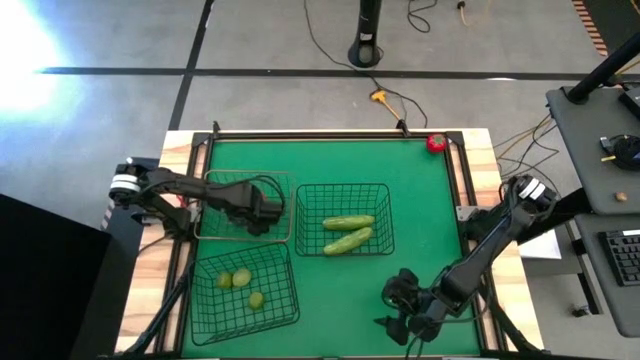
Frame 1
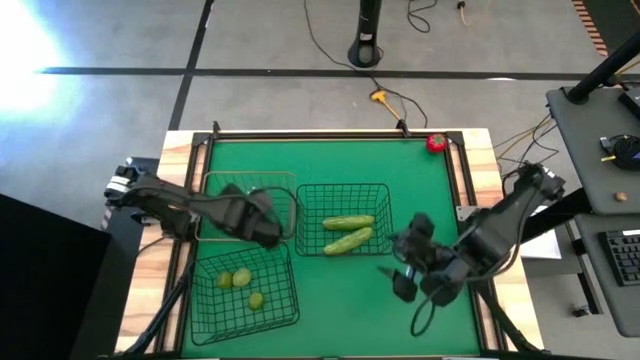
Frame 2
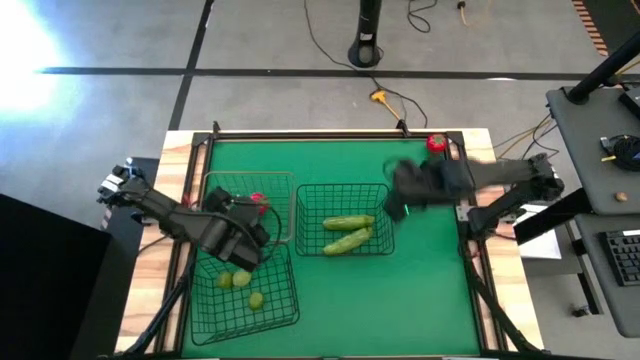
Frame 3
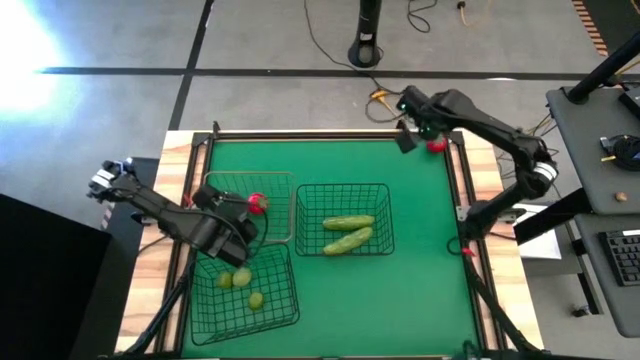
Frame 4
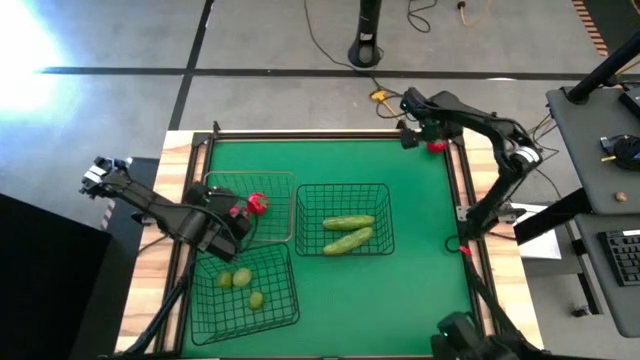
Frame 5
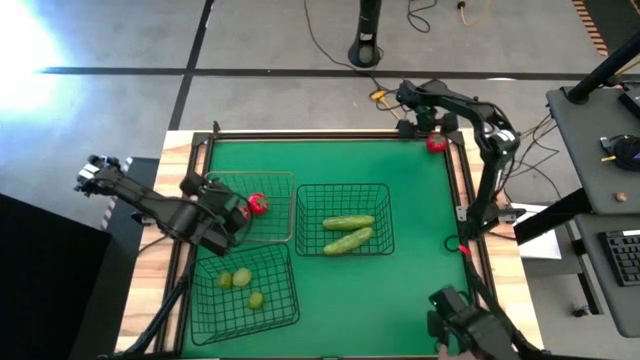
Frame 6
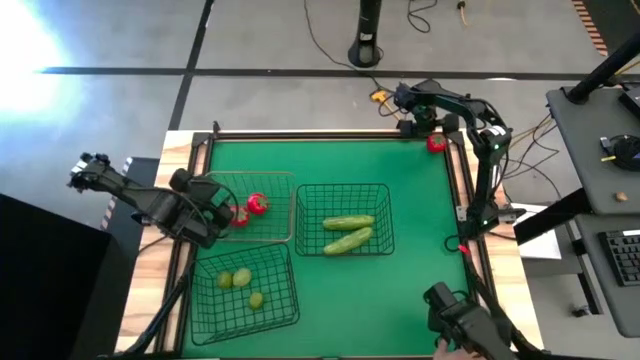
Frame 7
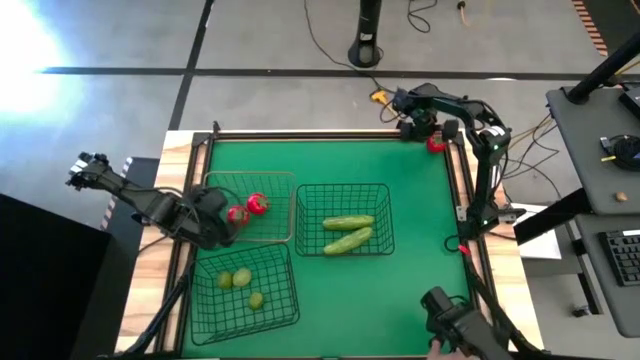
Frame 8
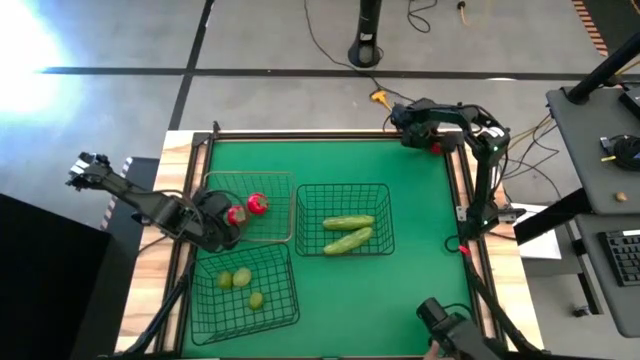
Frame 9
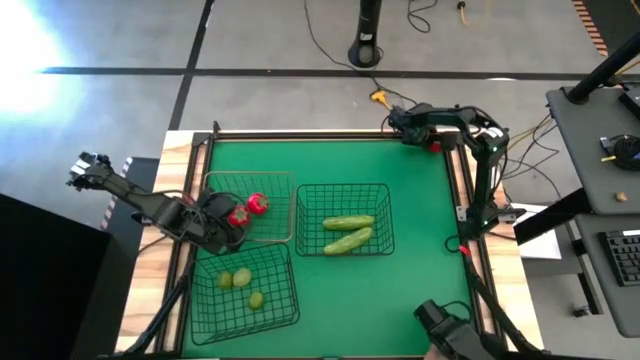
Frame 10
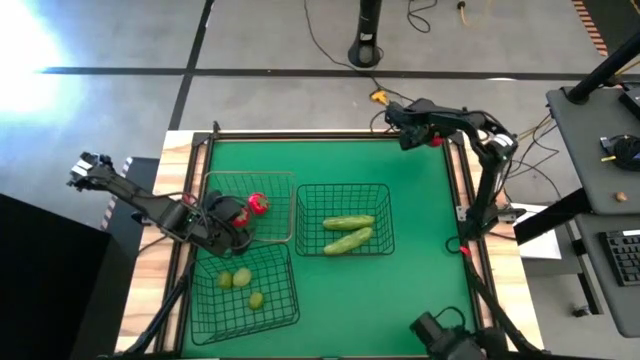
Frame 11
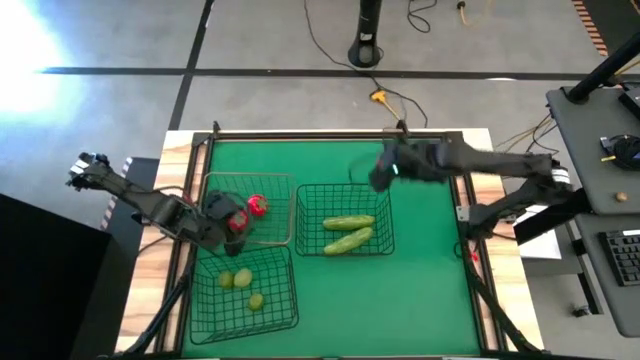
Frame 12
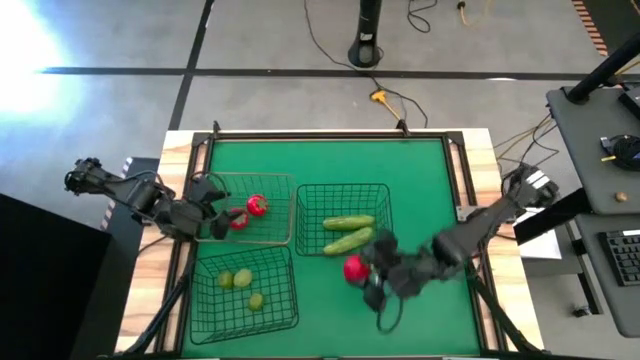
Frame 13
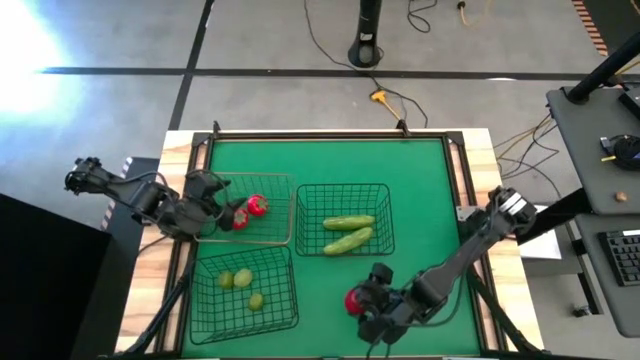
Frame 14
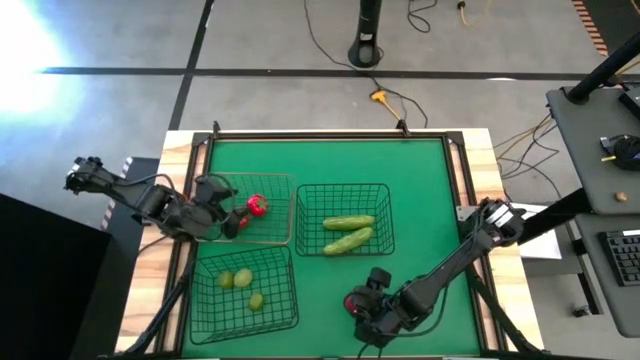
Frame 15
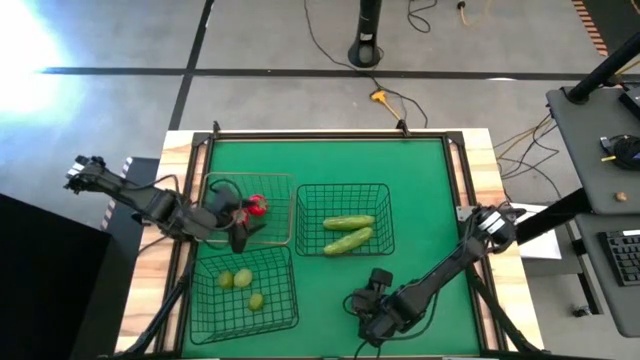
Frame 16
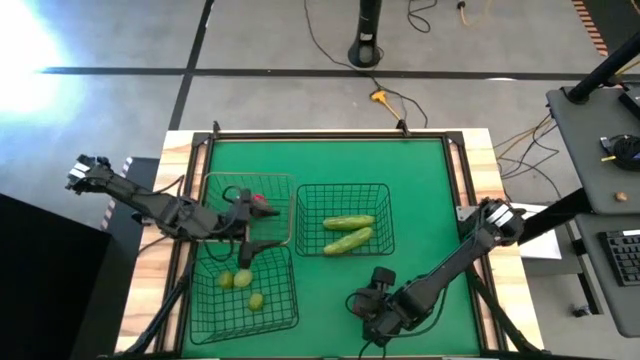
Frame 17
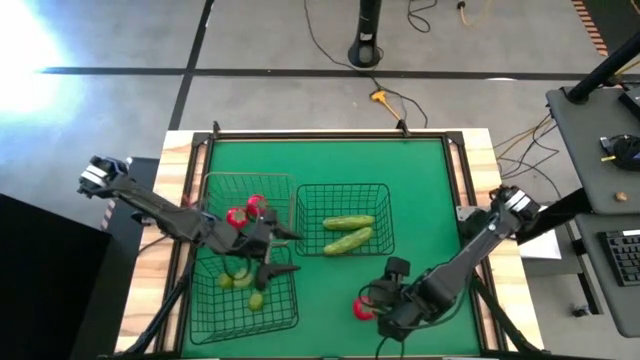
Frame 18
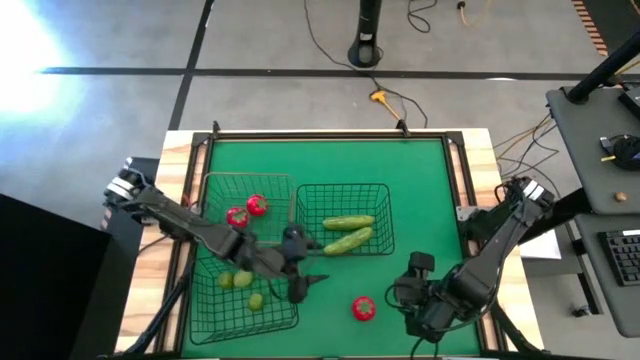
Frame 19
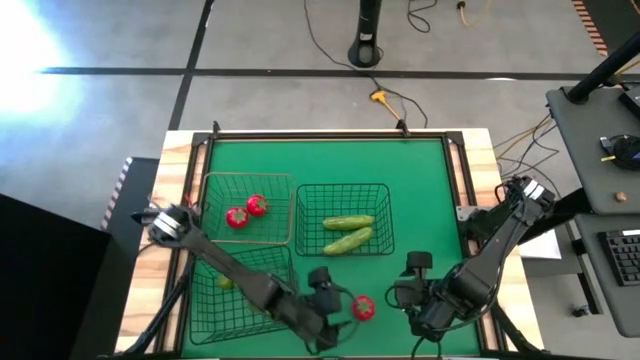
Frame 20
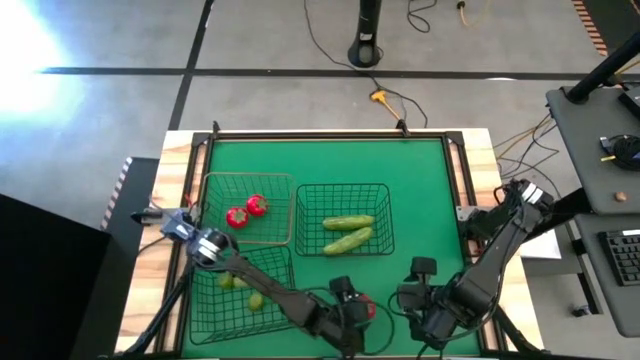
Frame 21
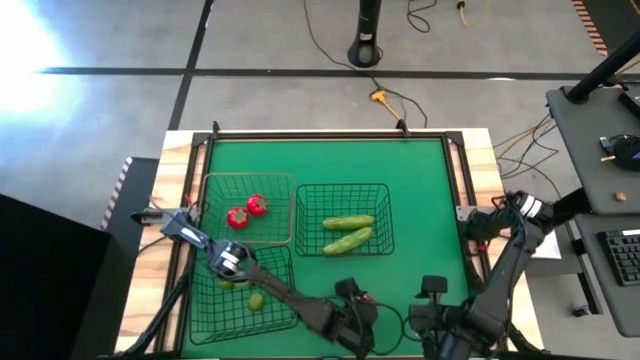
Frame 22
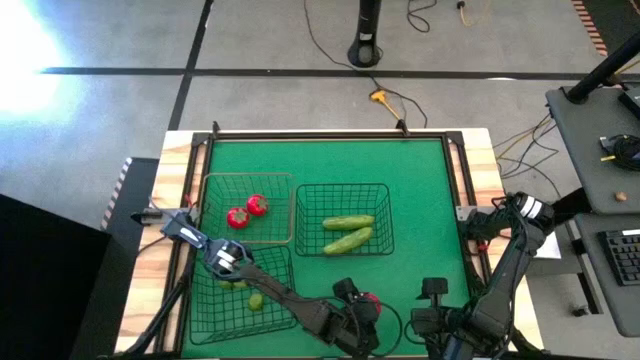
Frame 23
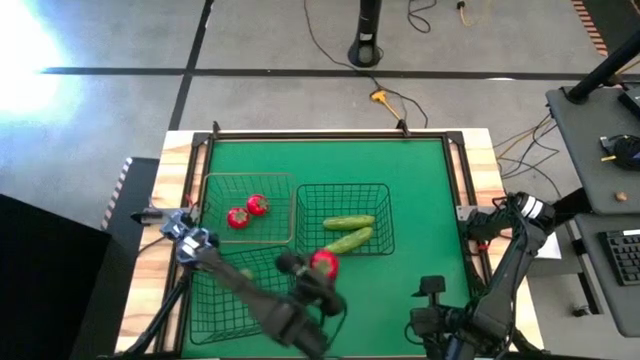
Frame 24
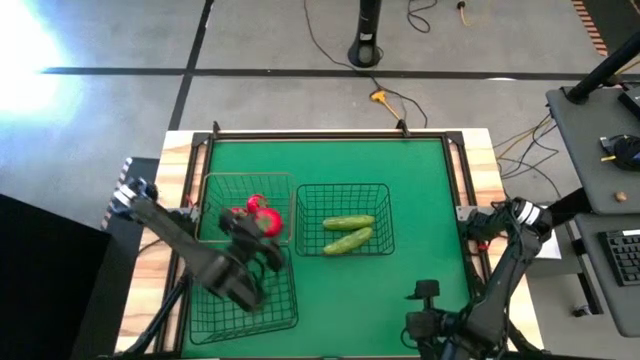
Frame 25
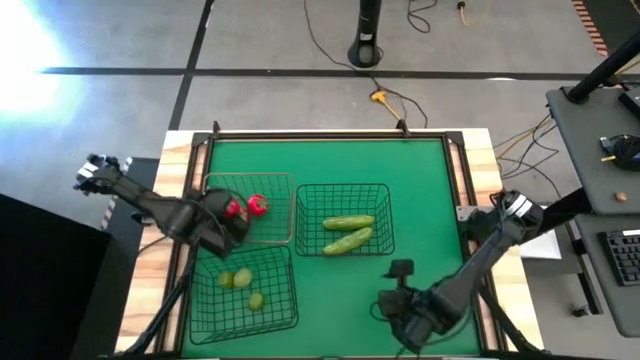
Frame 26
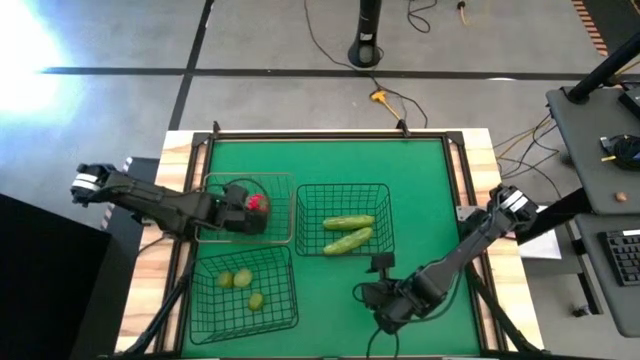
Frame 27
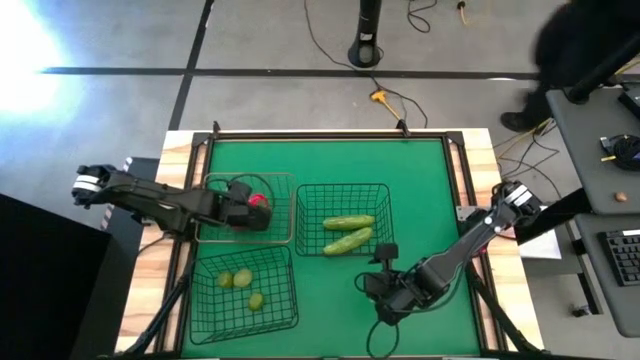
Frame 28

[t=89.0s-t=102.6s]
Task: Sort produce into baskets
Put the tomato into the gold wire basket

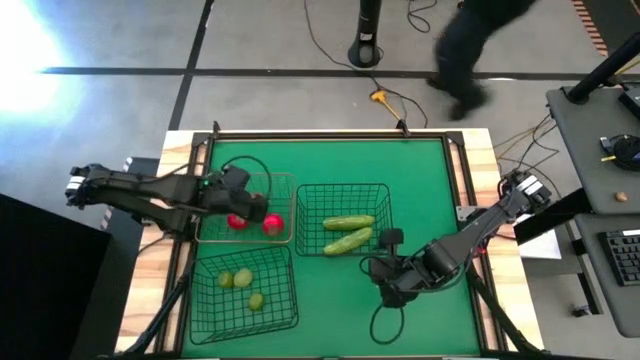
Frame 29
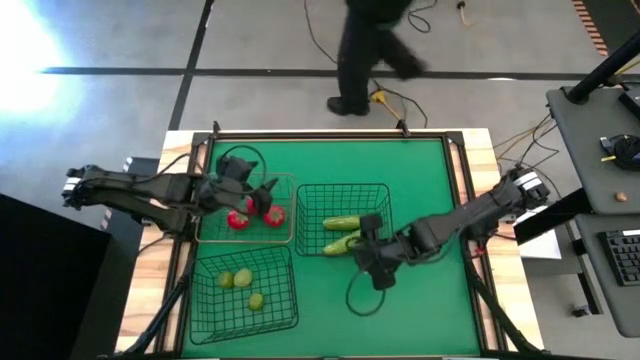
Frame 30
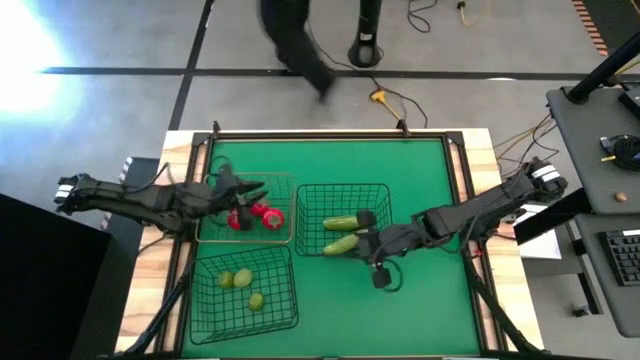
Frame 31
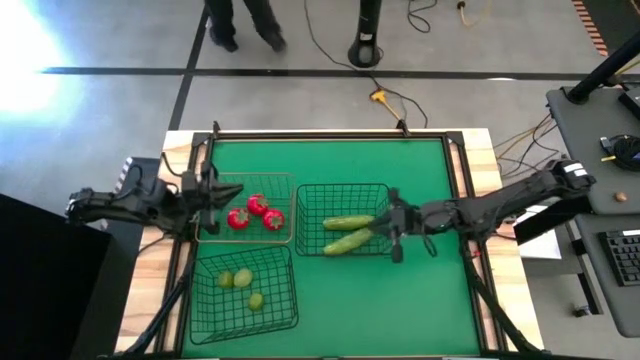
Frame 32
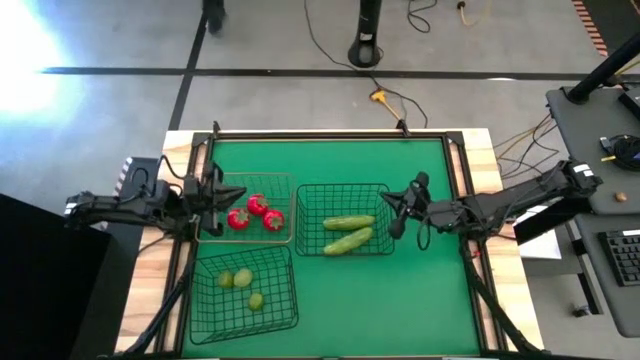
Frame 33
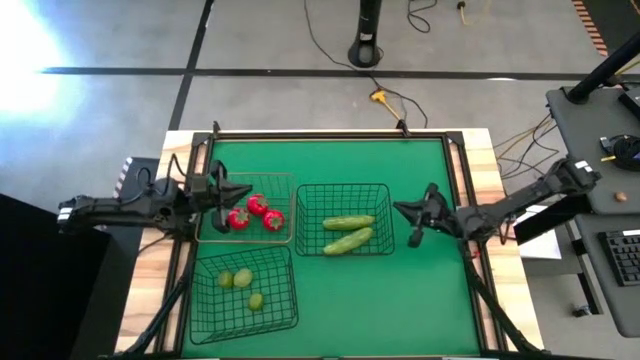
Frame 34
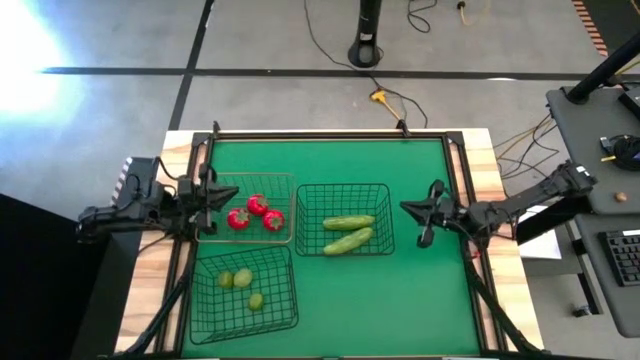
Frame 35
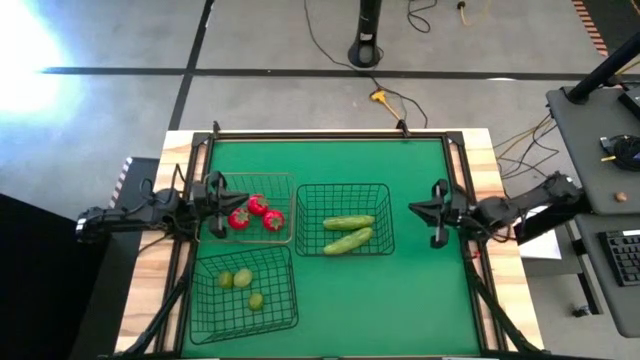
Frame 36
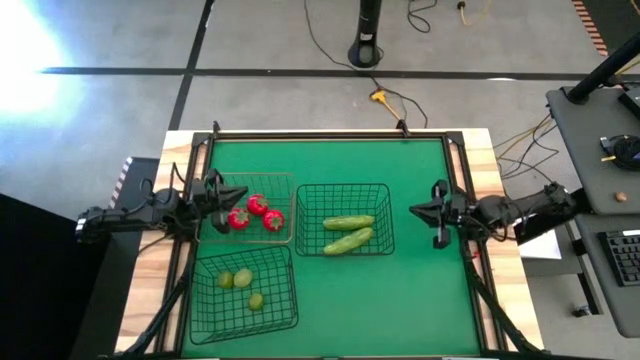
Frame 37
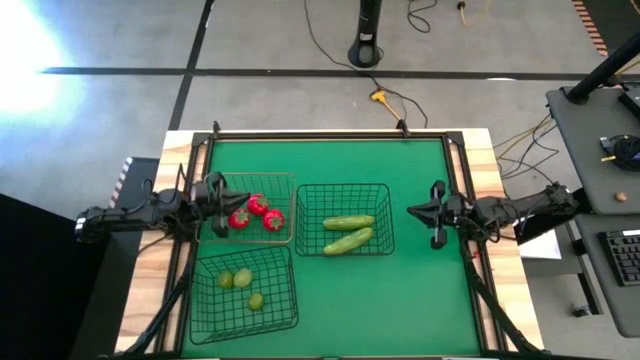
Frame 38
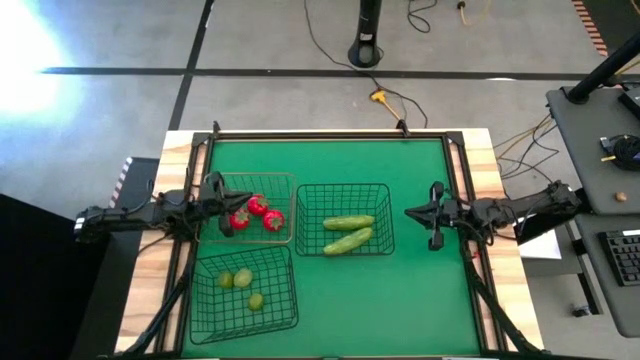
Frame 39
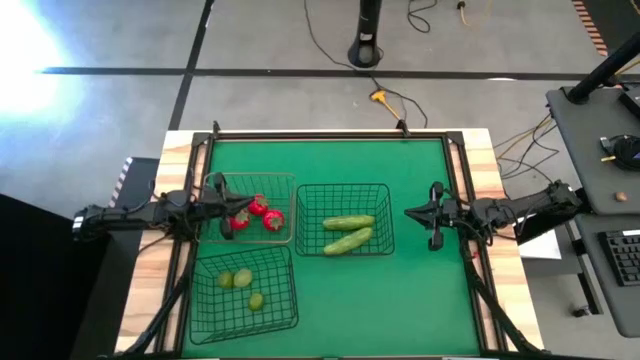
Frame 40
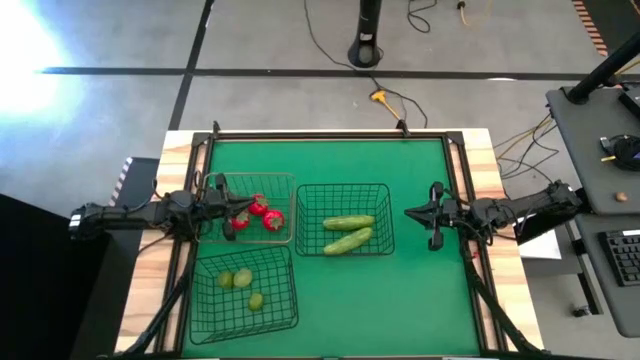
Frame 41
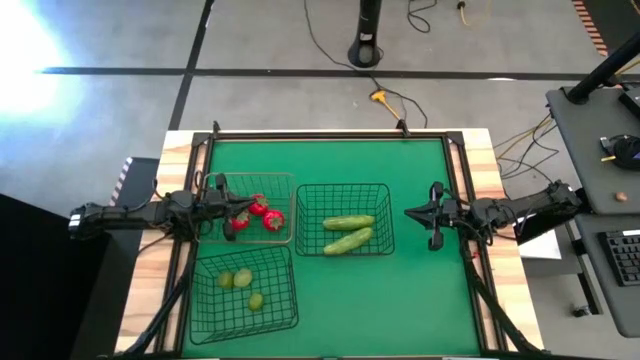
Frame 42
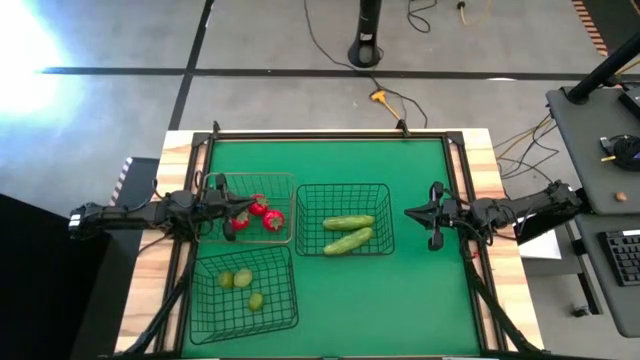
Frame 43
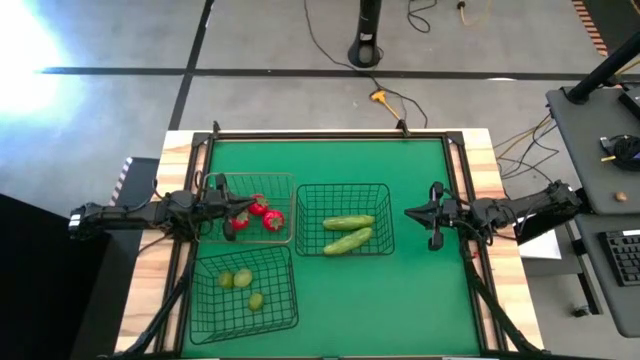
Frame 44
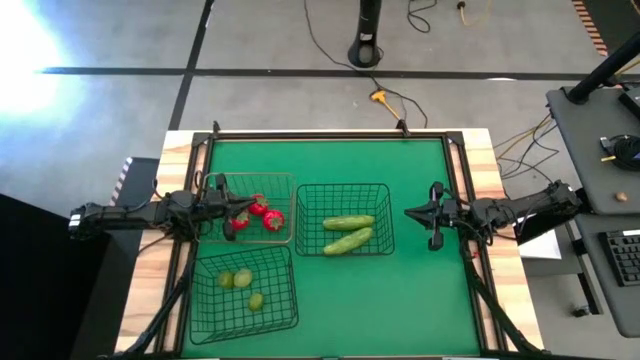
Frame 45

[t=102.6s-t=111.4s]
Return to Home Position
